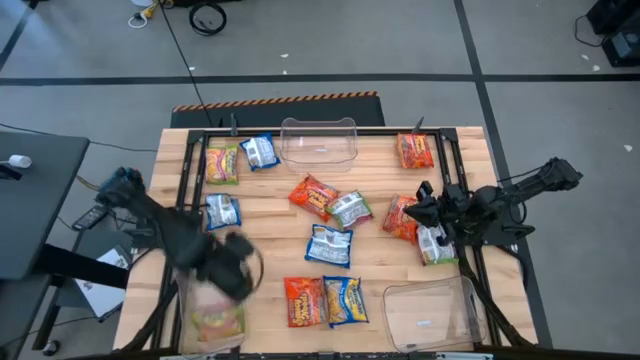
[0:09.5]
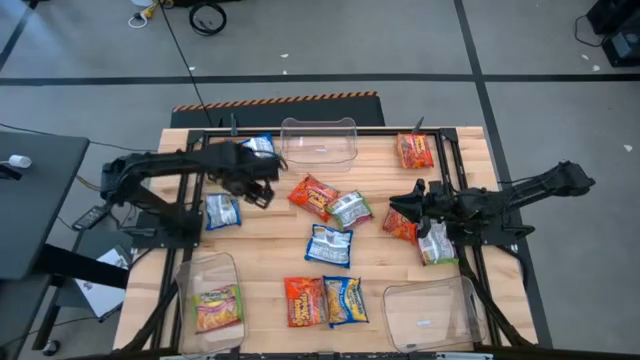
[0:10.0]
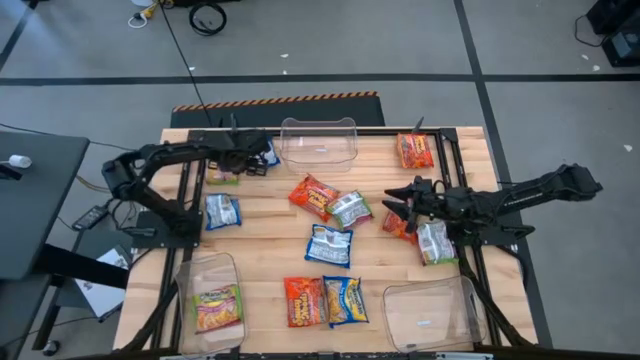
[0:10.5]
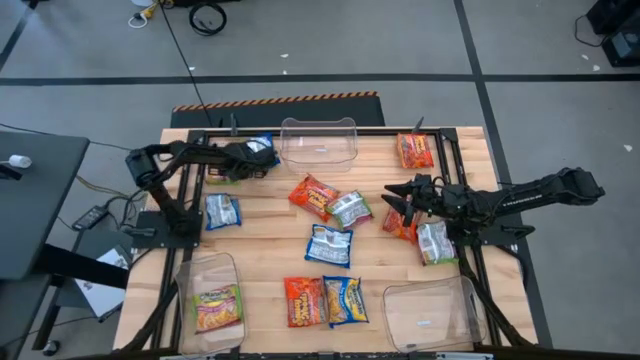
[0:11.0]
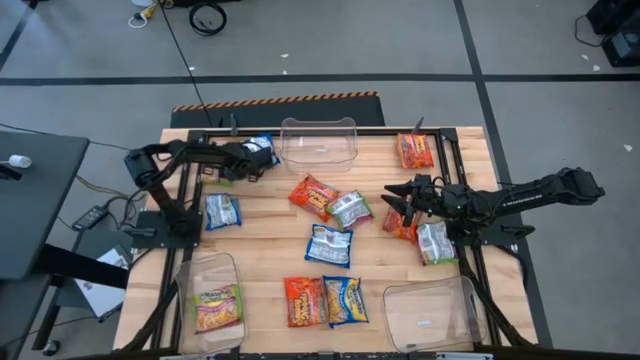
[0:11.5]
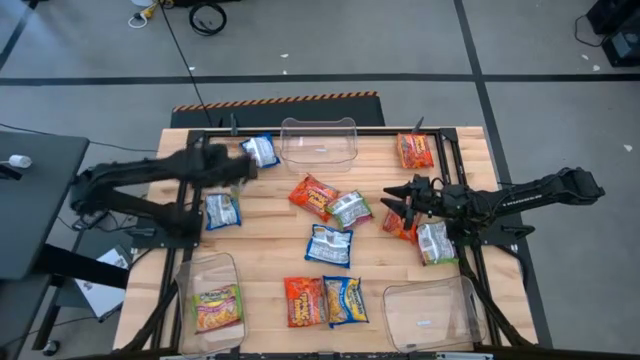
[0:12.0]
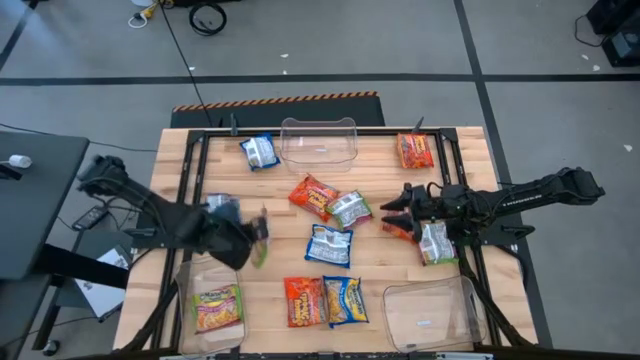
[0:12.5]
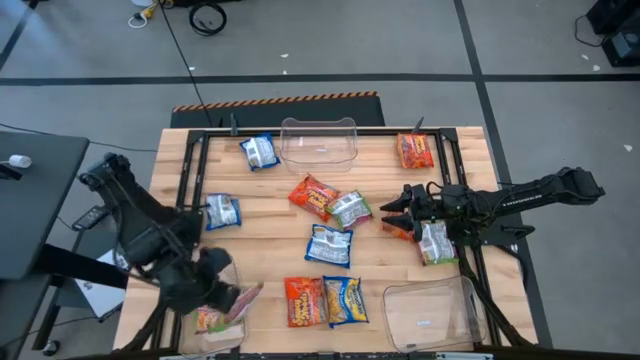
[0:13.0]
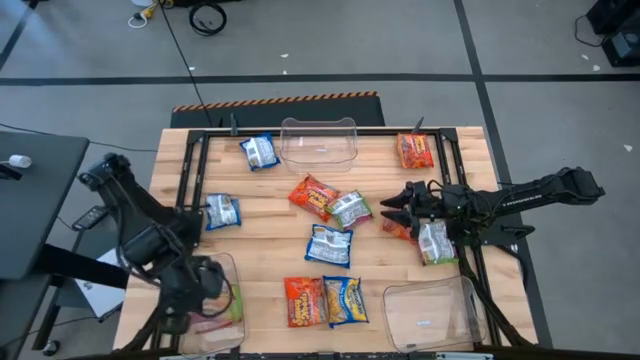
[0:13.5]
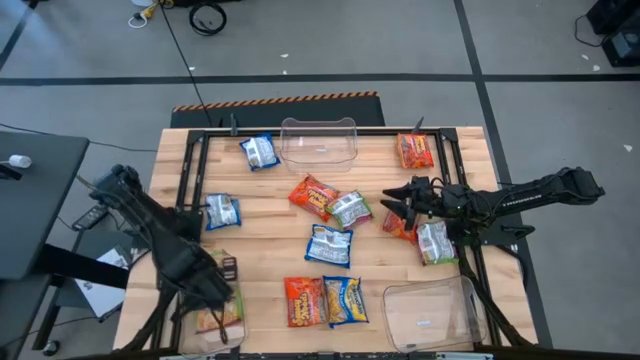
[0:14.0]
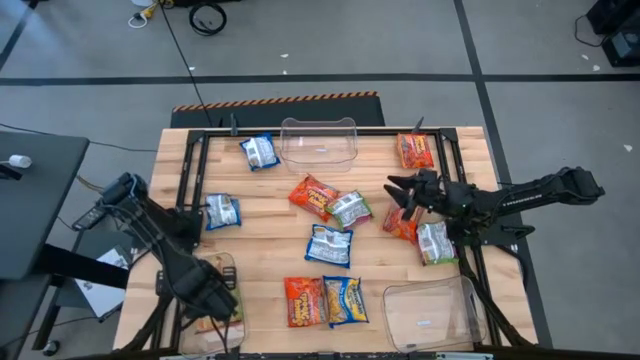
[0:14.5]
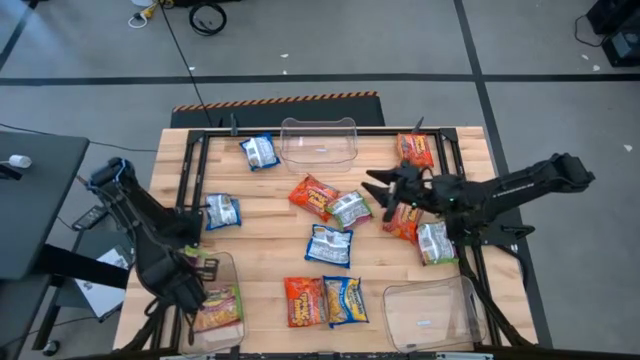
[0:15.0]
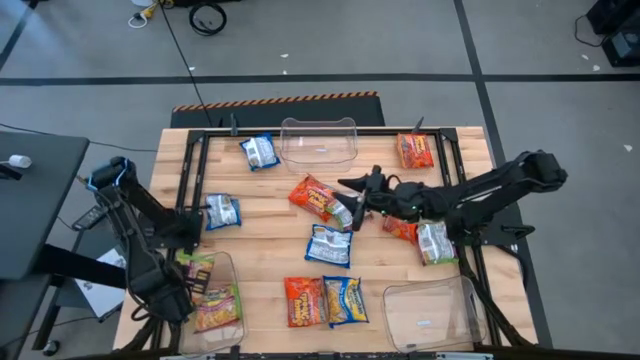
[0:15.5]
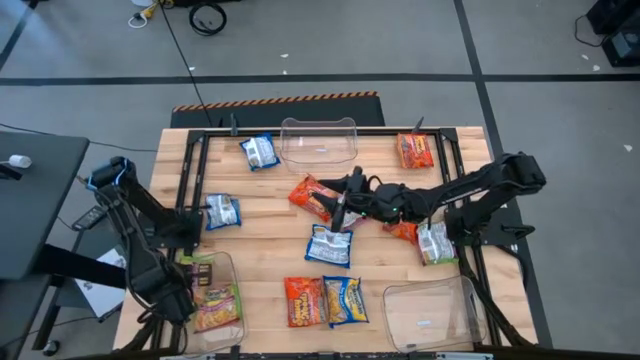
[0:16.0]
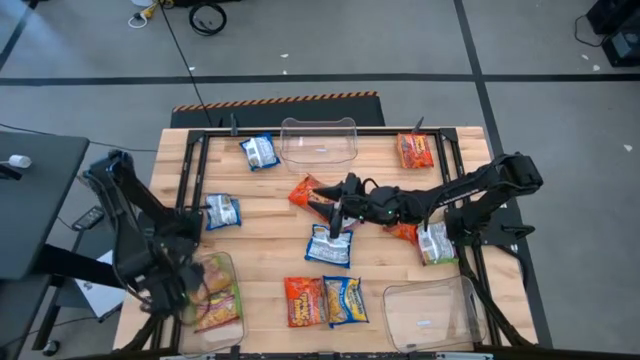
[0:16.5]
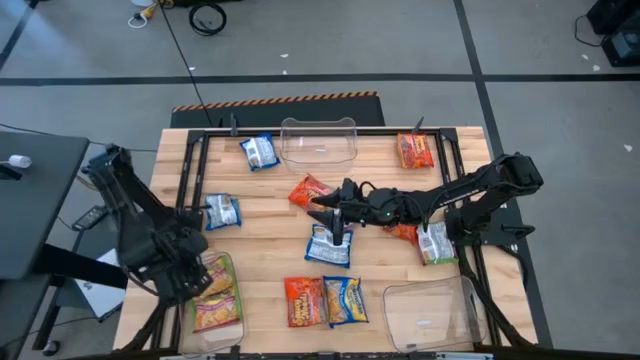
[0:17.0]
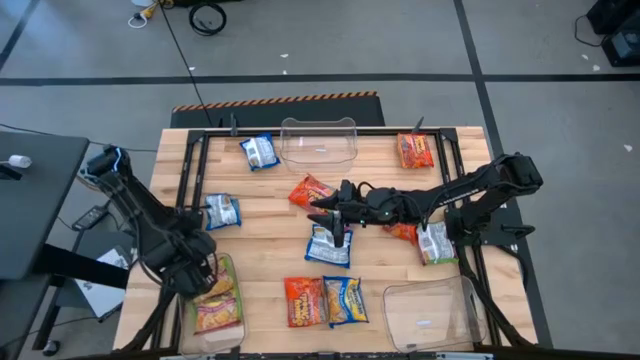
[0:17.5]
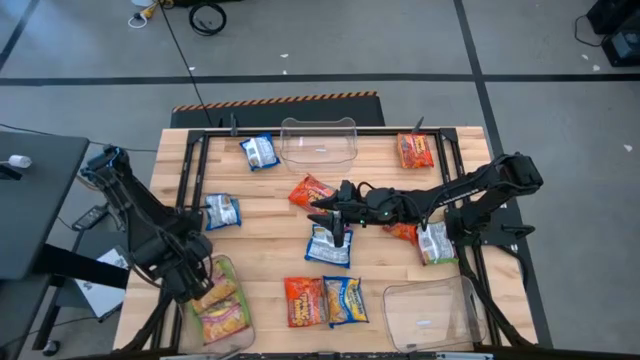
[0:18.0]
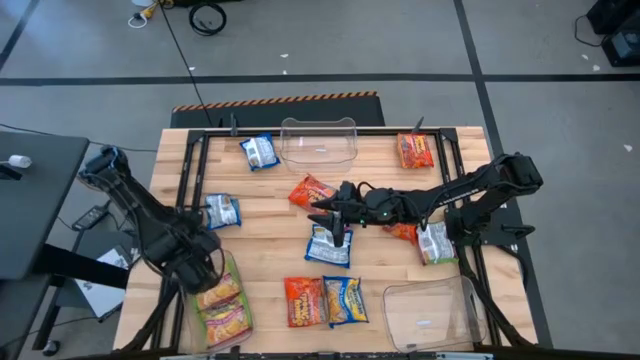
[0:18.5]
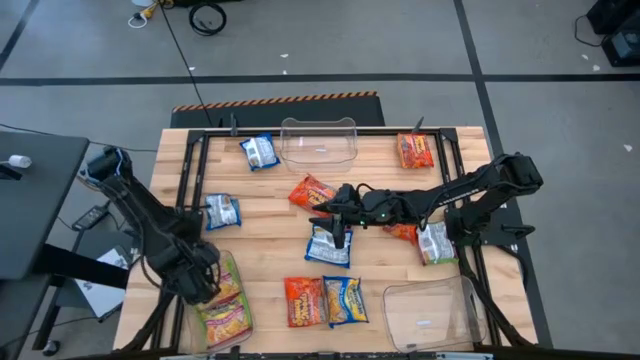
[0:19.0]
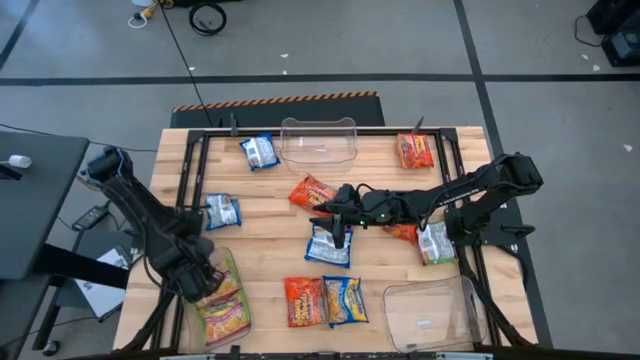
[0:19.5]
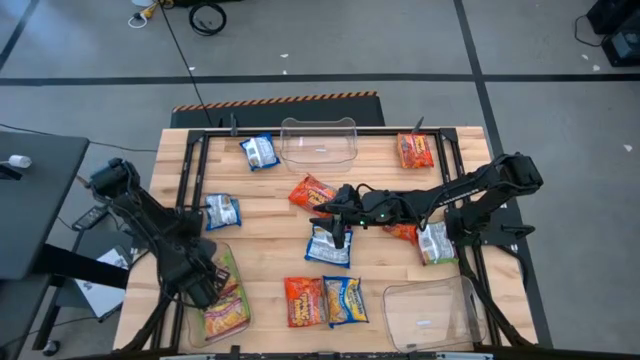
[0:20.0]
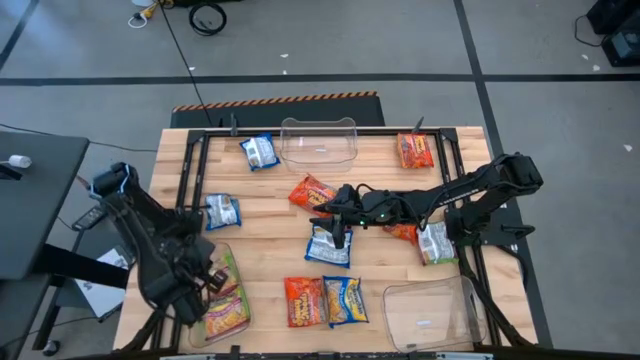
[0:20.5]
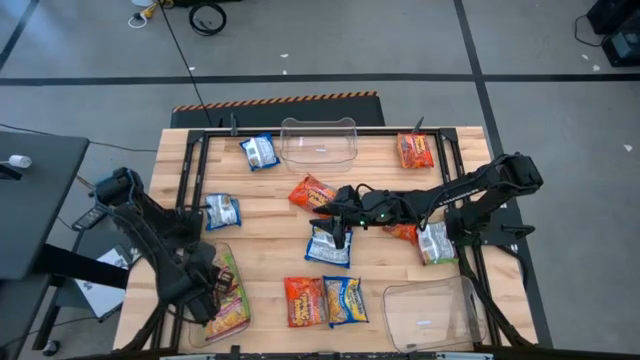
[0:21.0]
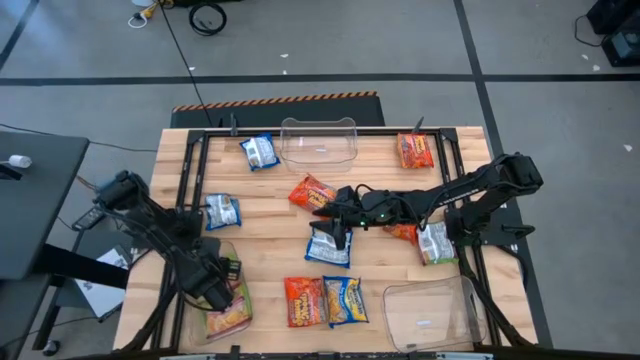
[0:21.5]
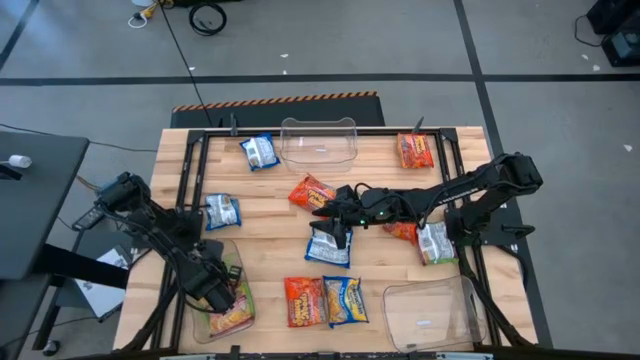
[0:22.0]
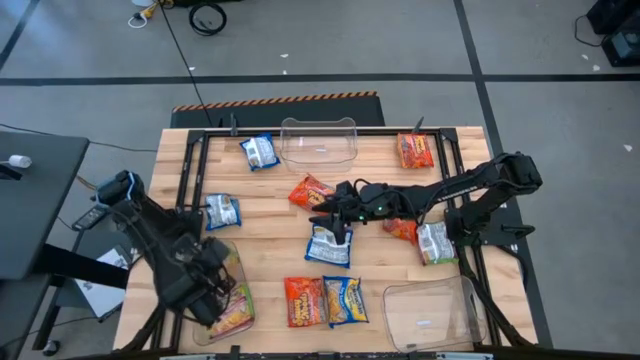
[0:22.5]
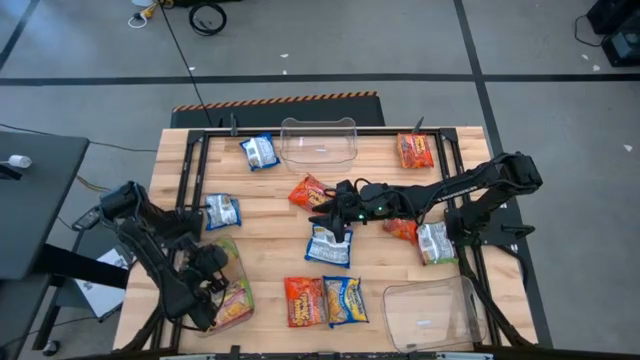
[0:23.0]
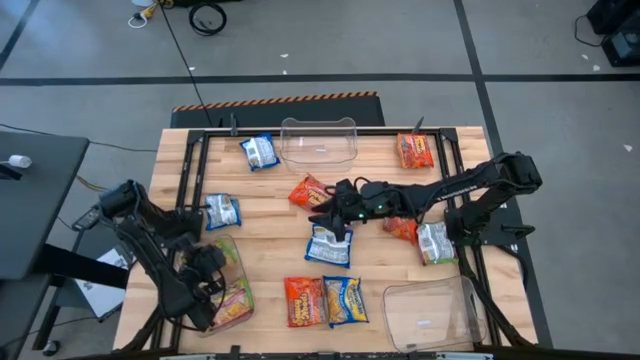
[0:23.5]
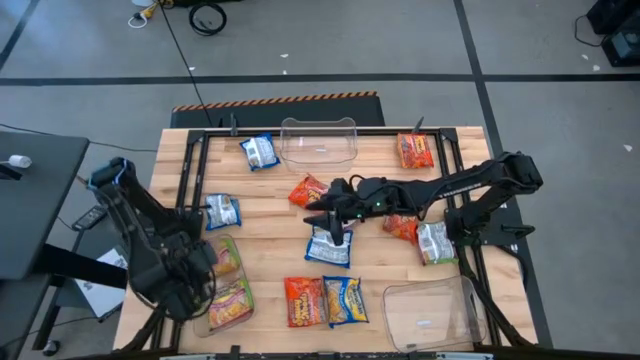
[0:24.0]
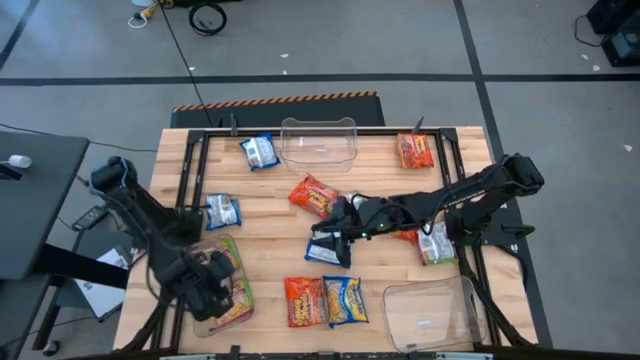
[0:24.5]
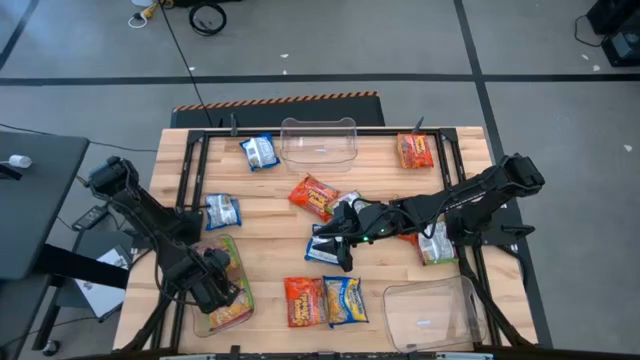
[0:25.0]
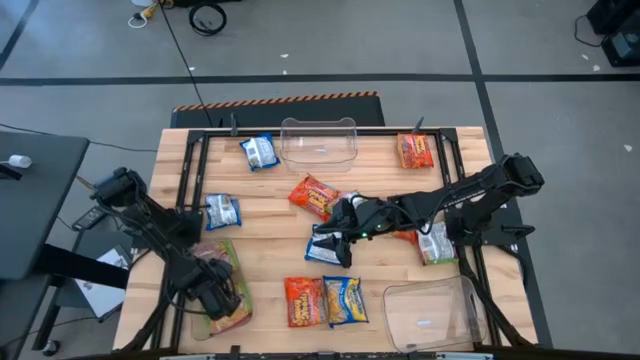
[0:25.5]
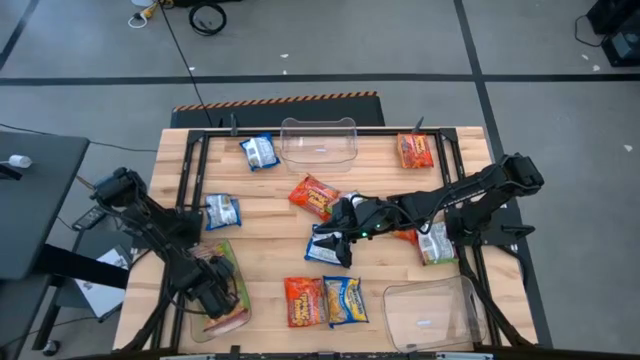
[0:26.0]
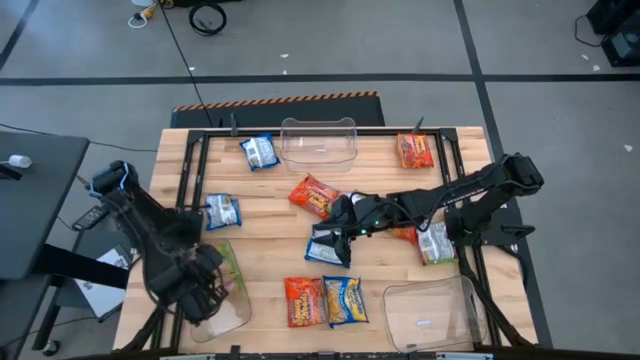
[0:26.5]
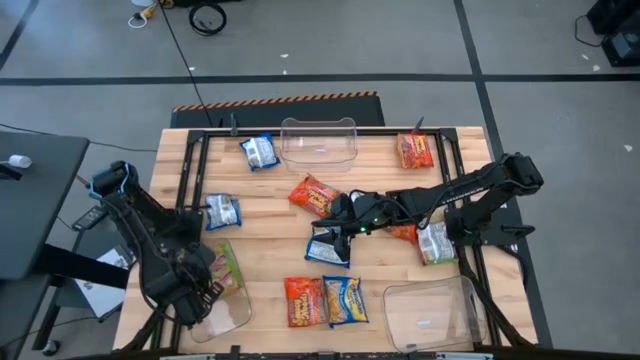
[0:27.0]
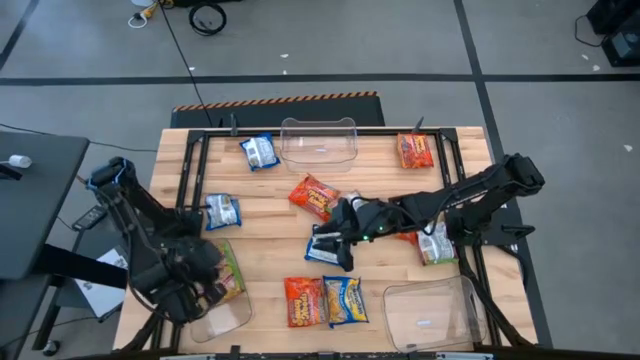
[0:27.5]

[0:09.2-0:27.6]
Task: Sort Maruchan noodles
Put the green noodle pack into the bottom left transparent bin

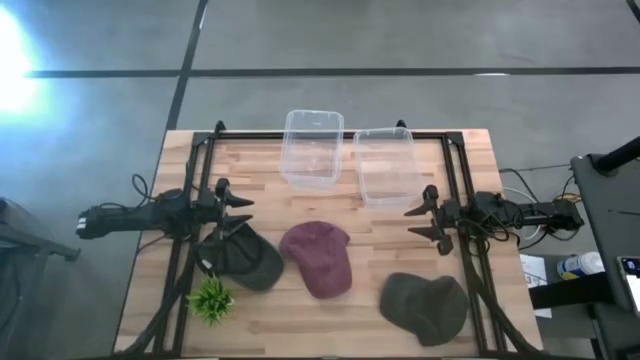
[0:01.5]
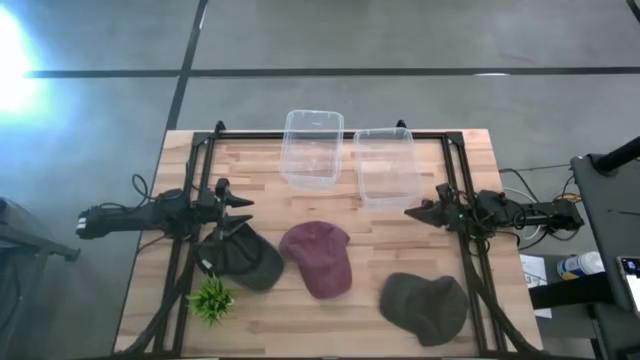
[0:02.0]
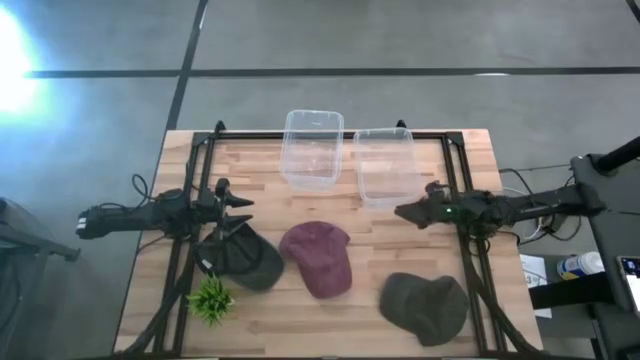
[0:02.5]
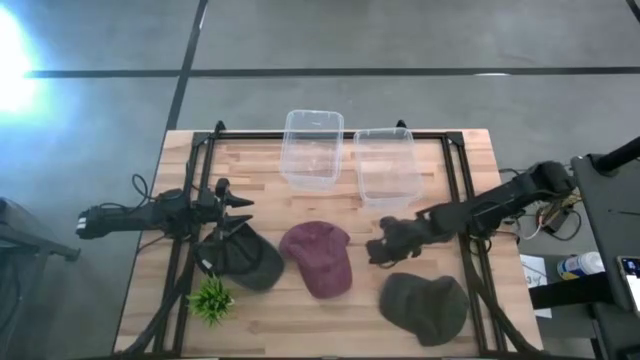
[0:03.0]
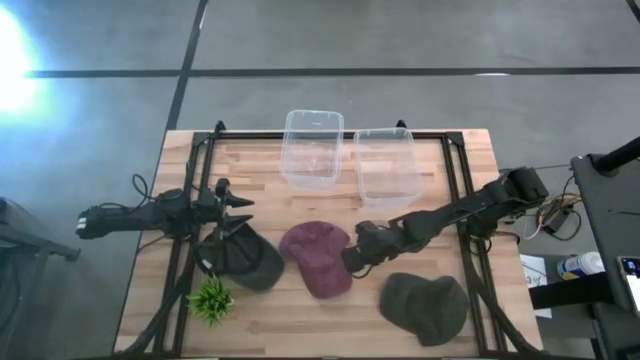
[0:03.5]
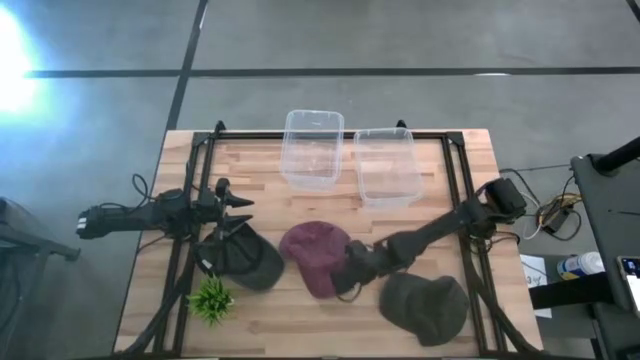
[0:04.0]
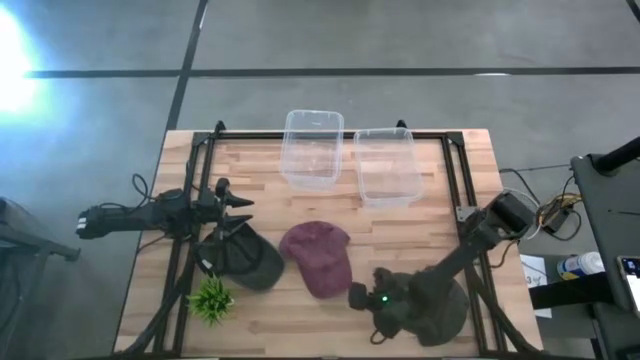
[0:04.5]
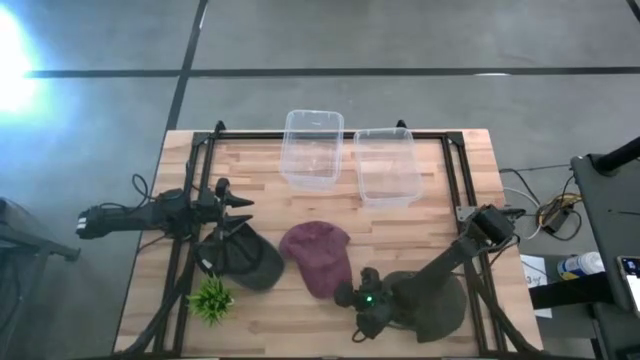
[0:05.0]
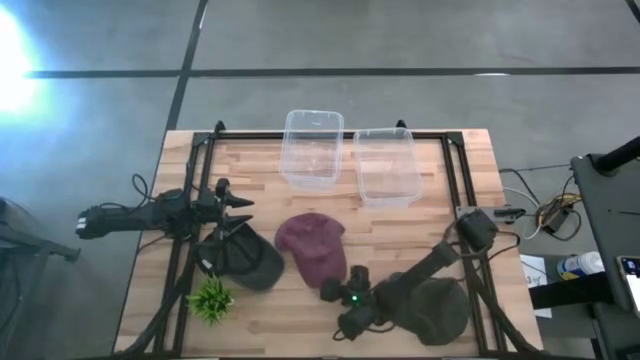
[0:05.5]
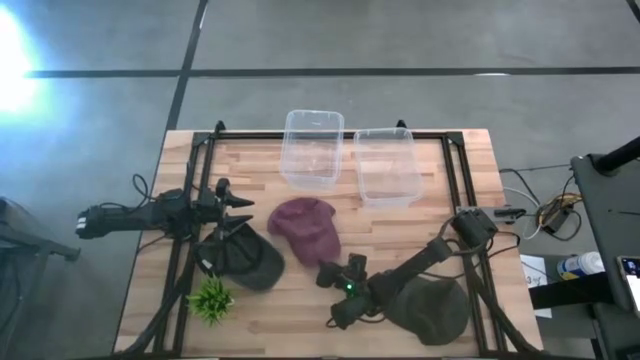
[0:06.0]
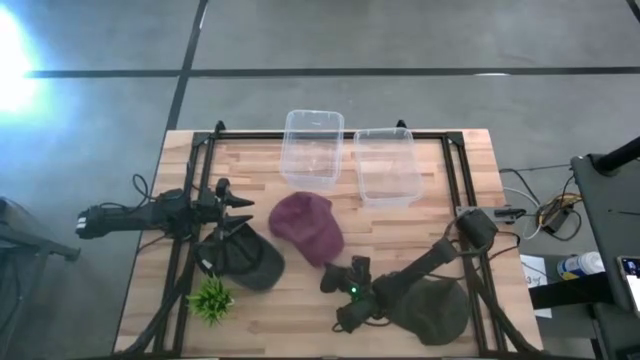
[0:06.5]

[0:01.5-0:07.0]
Task: Pick & Place hat
Put the red cap into the left transparent bin
